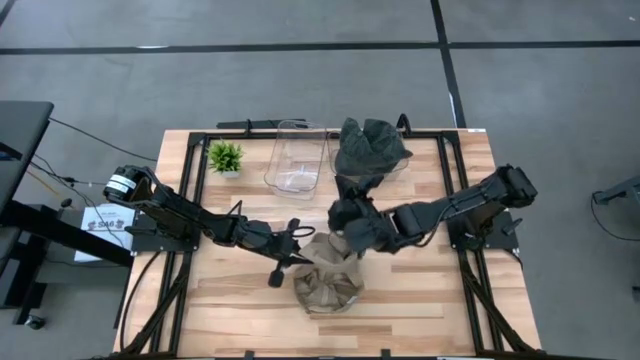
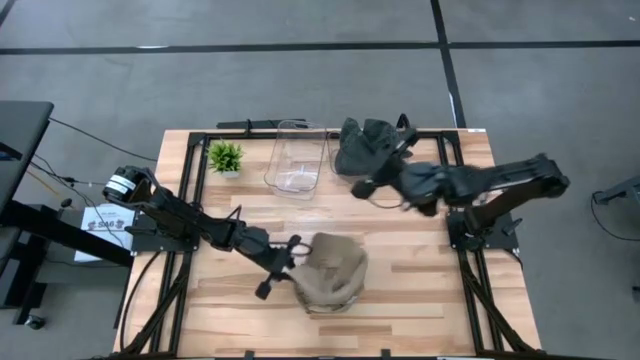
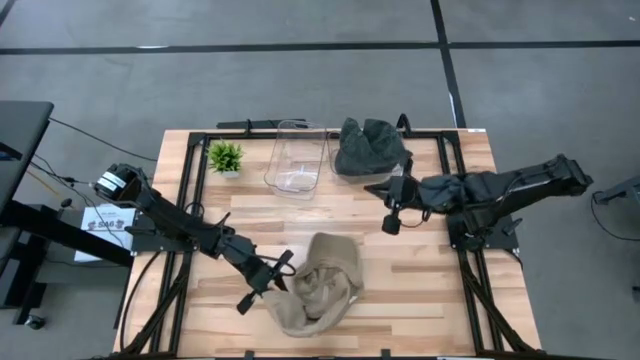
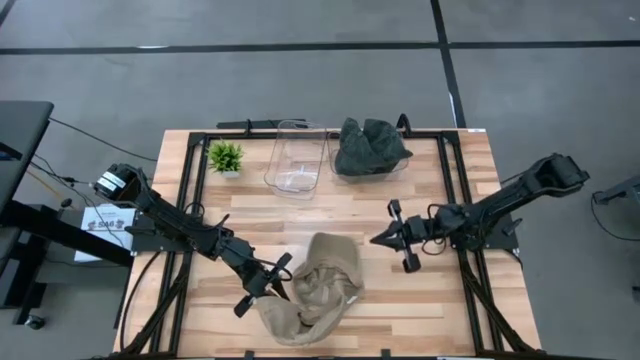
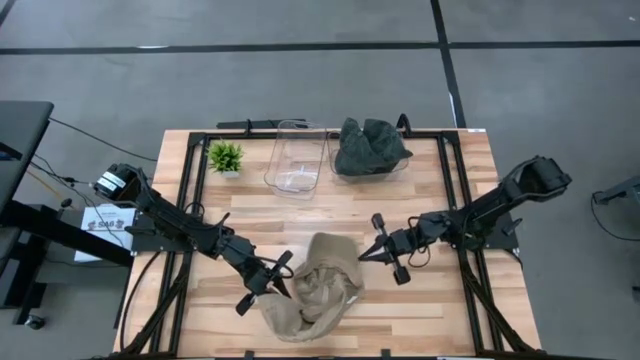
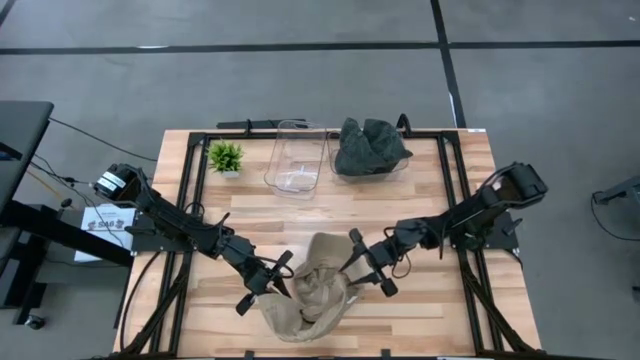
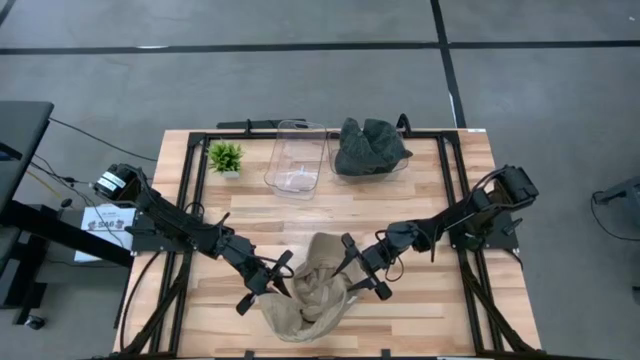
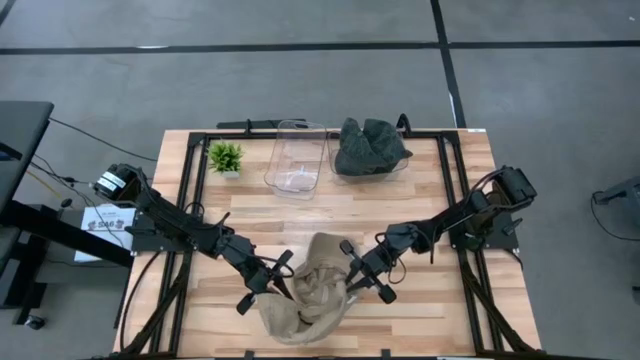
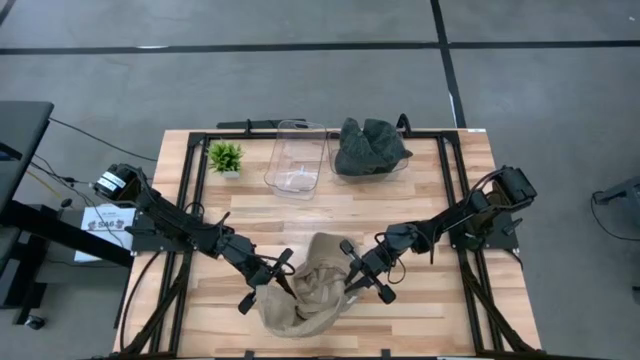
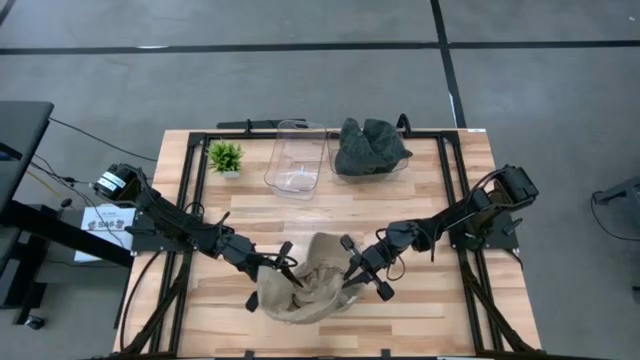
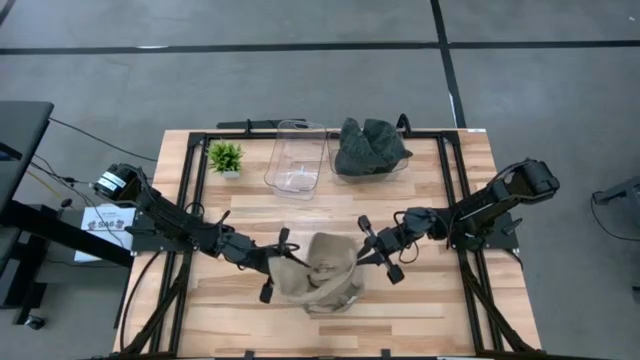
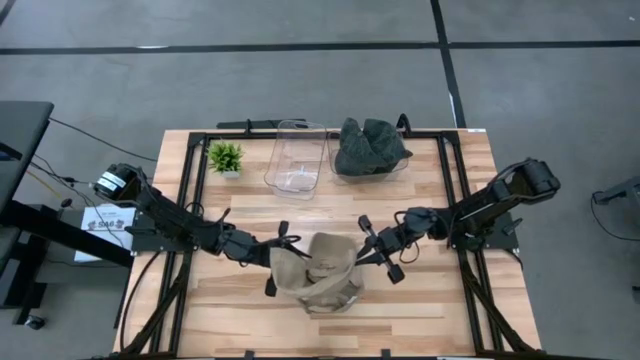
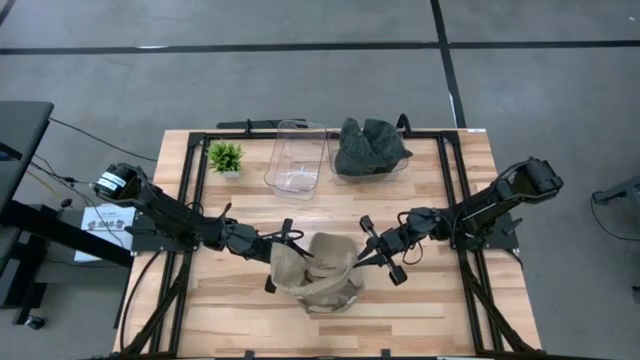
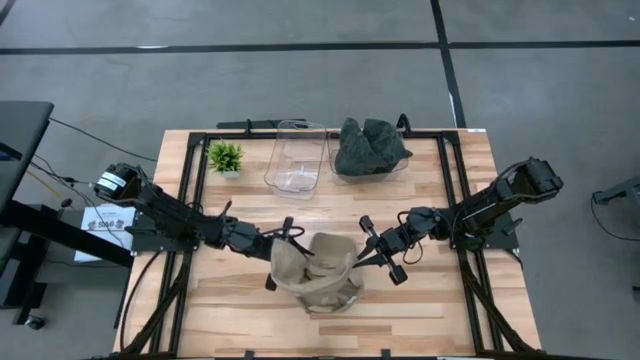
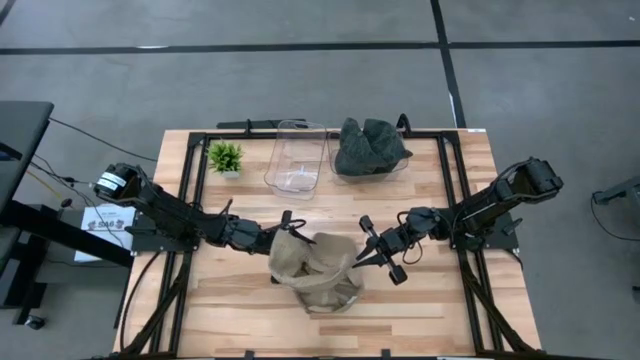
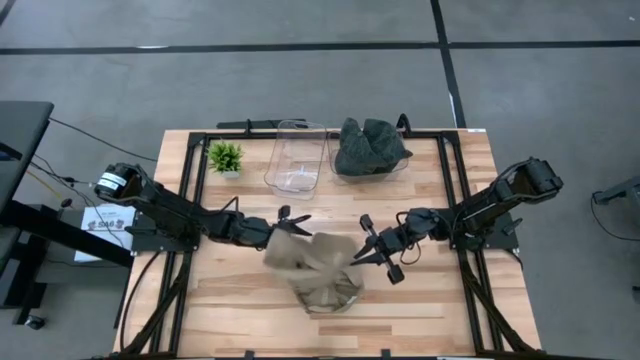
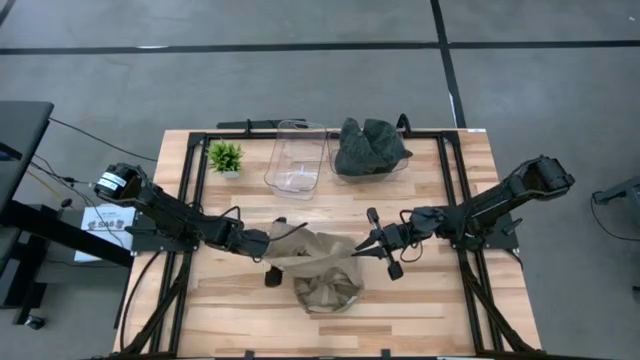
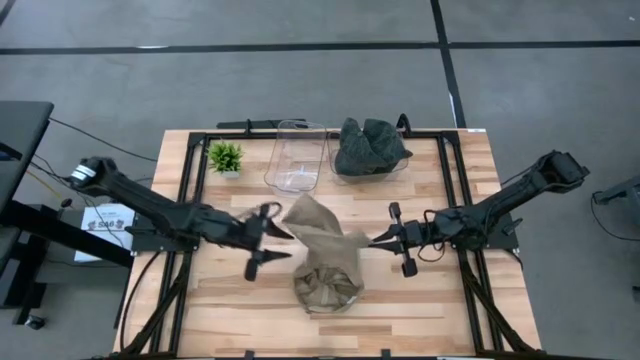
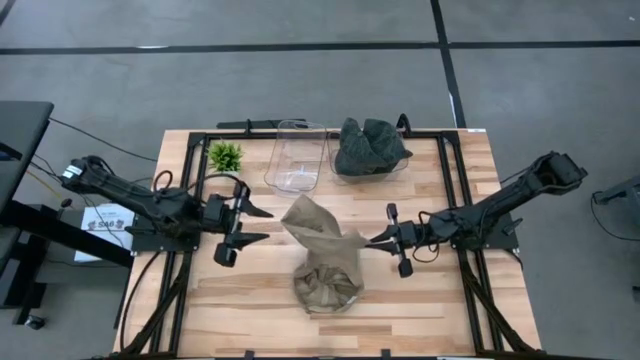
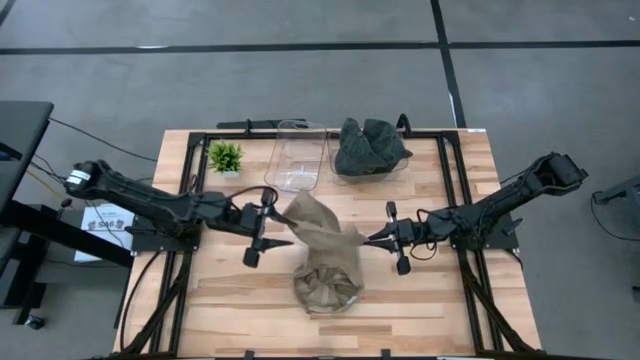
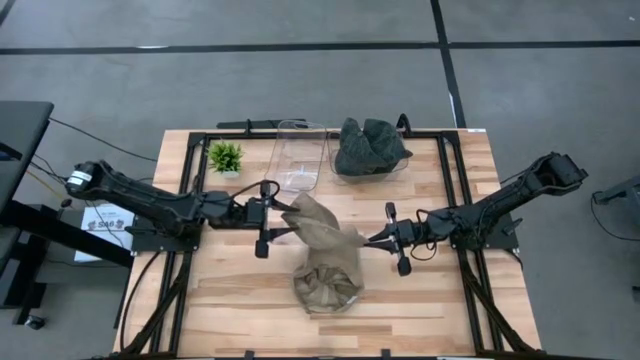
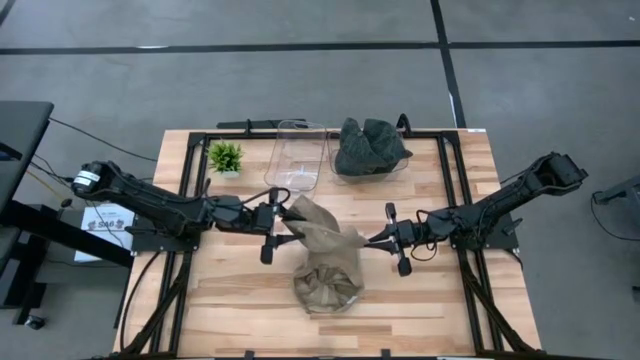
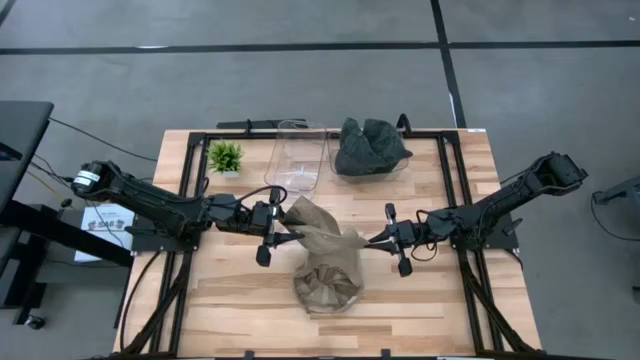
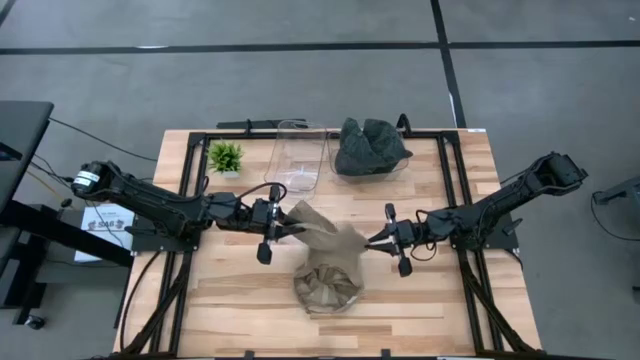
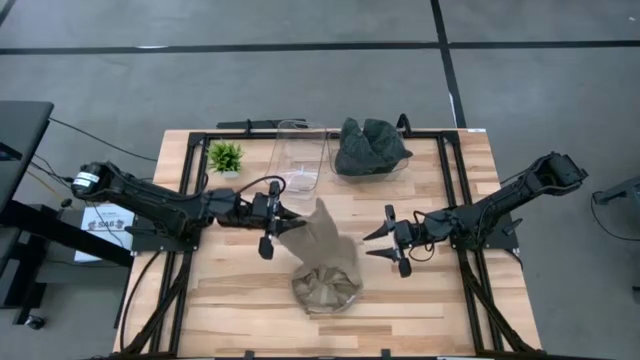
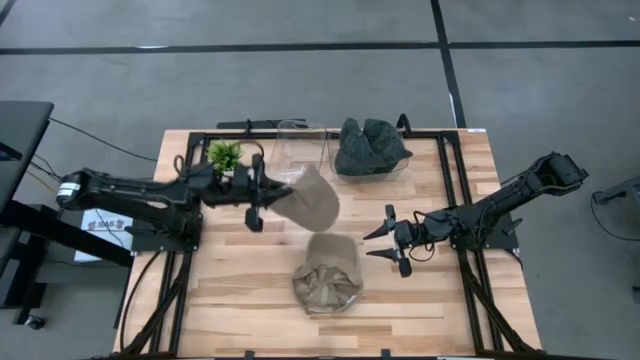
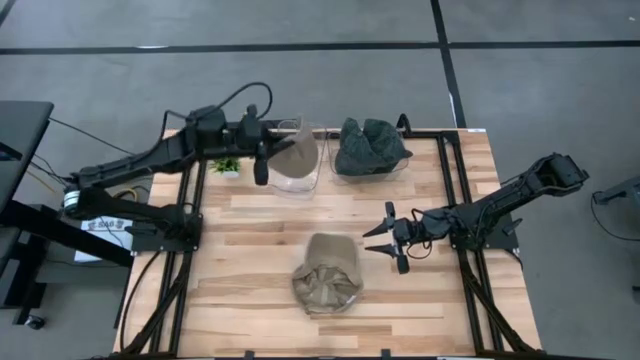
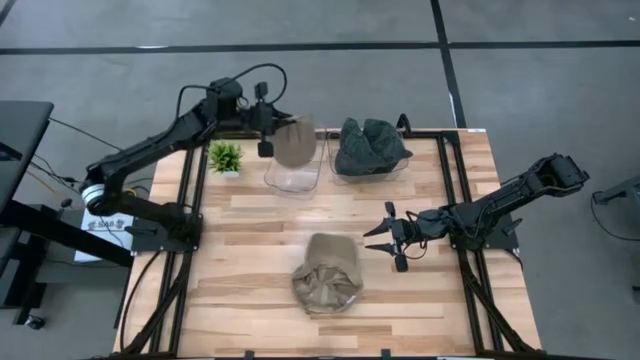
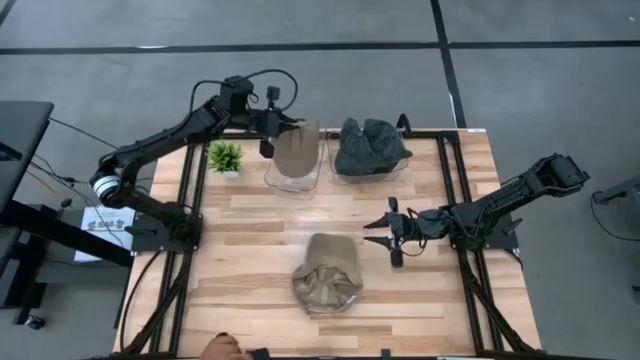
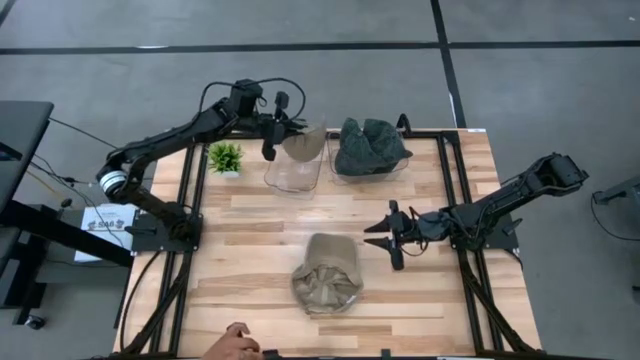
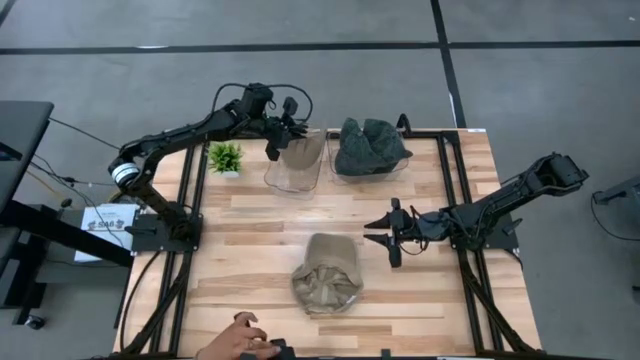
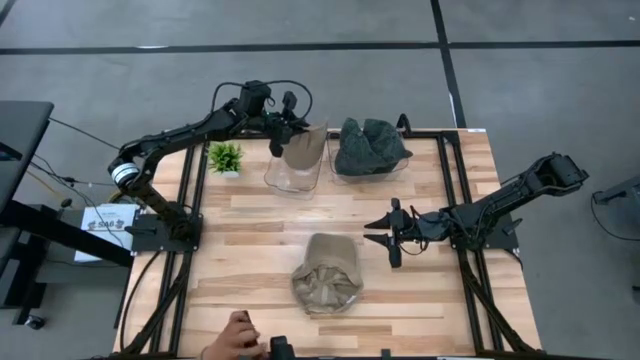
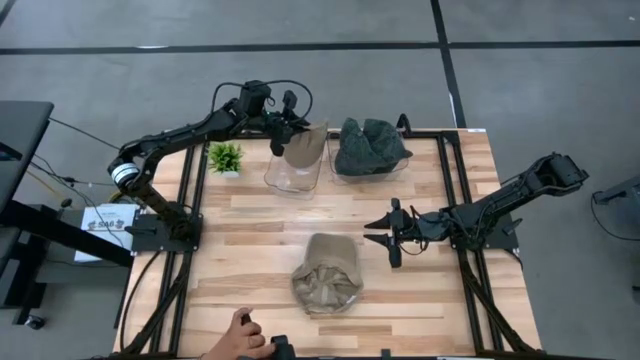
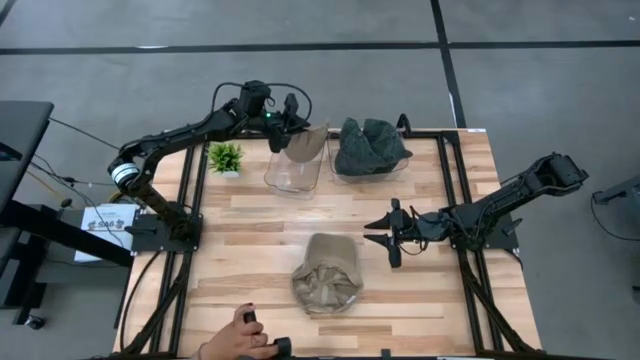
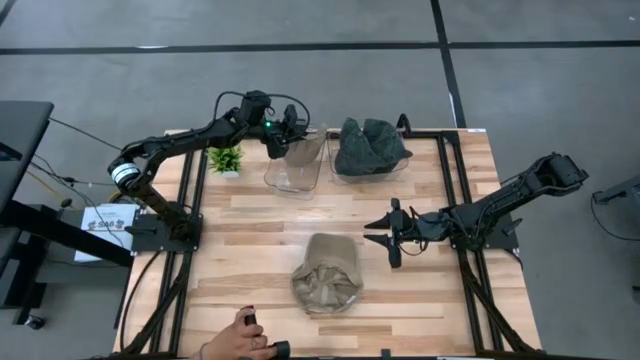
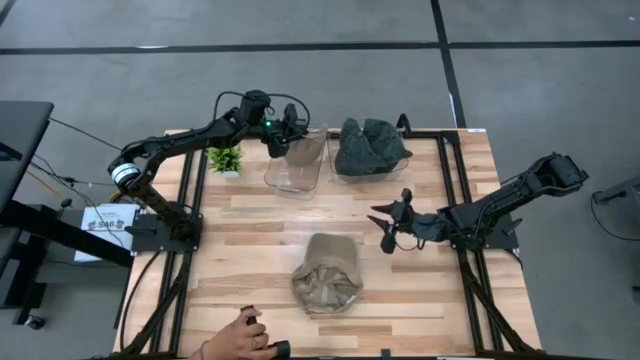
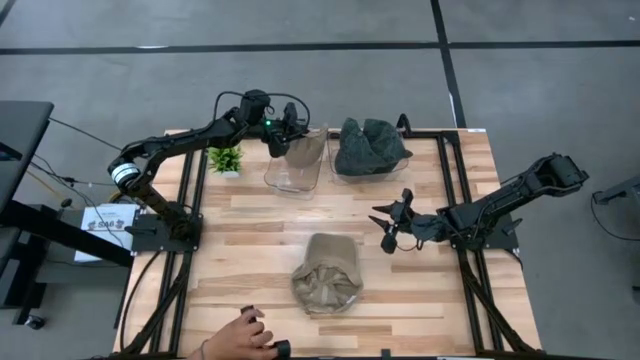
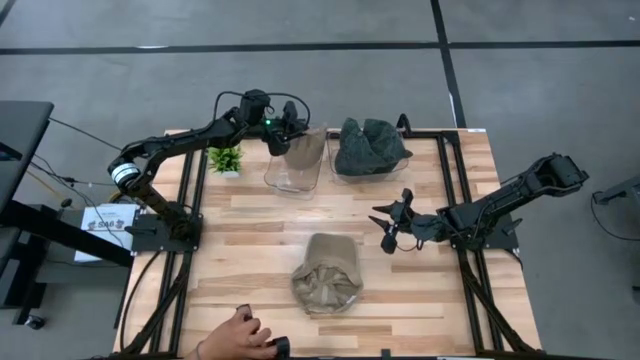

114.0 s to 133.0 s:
Task: Pick & Place hat
Put the top light brown cap into the left transparent bin
